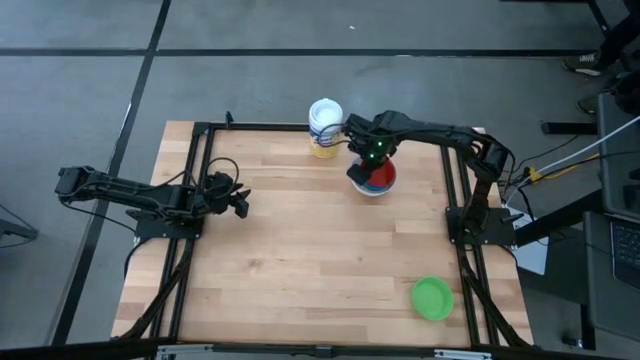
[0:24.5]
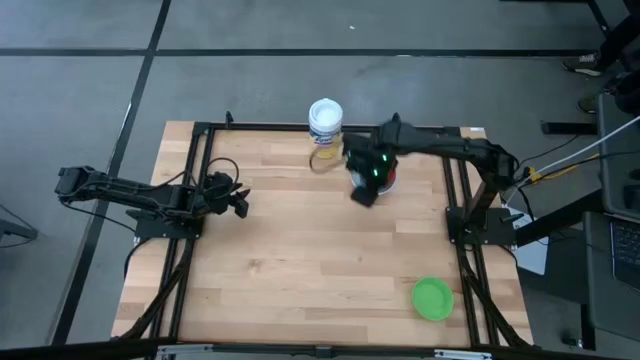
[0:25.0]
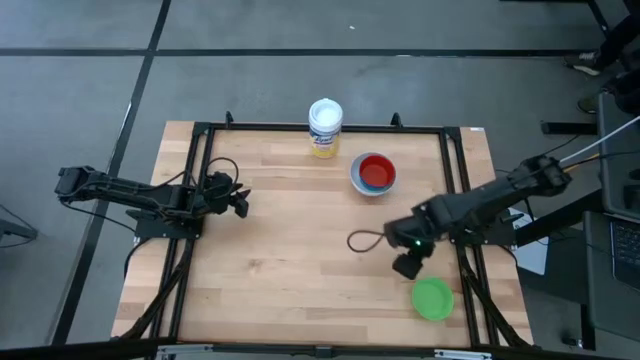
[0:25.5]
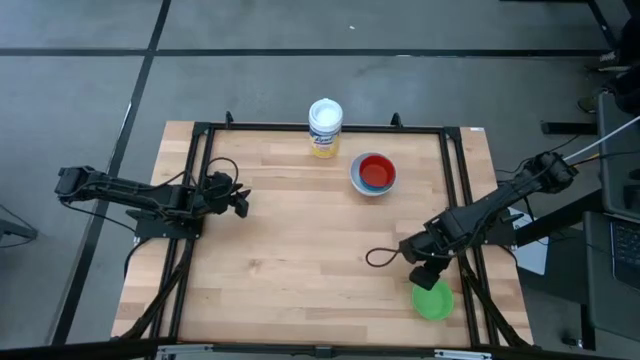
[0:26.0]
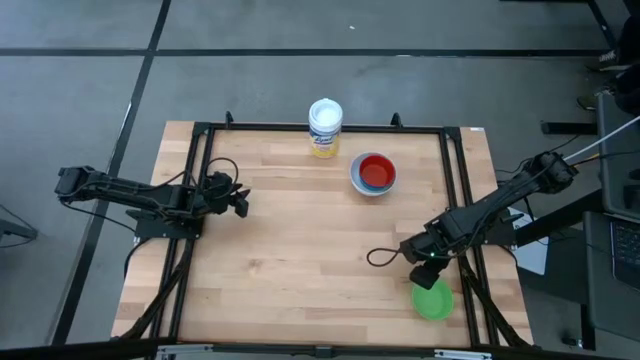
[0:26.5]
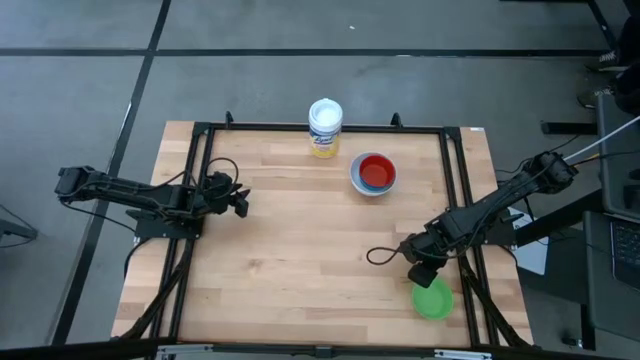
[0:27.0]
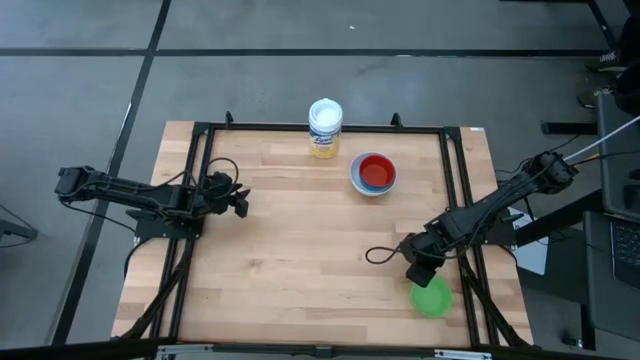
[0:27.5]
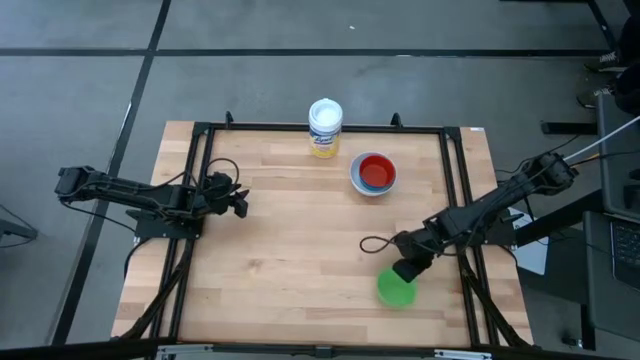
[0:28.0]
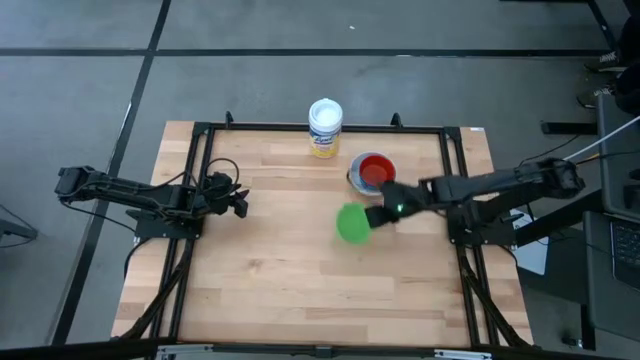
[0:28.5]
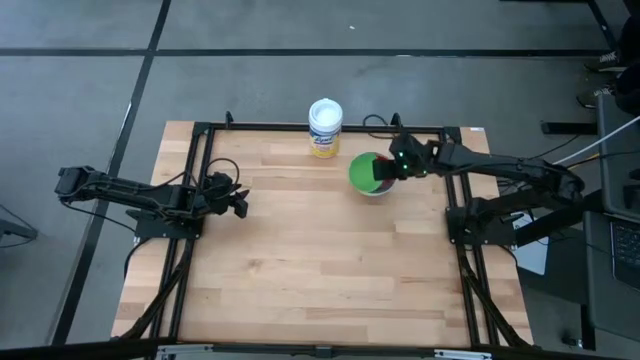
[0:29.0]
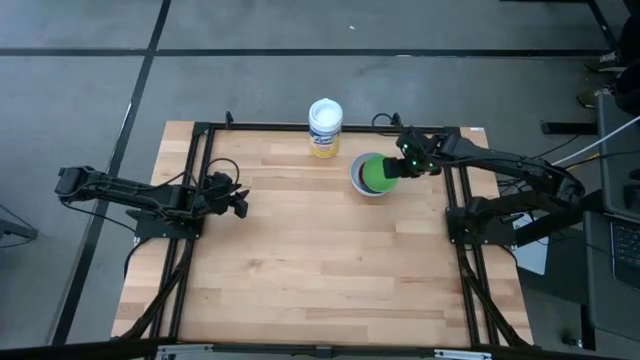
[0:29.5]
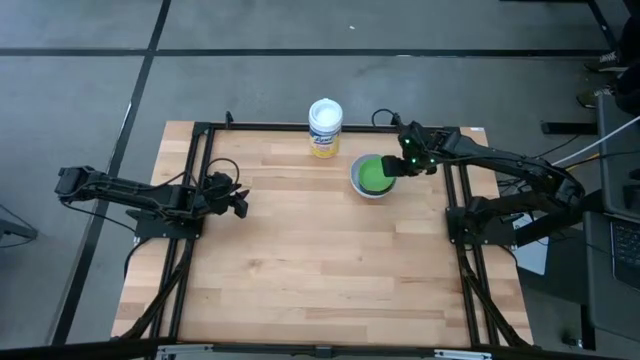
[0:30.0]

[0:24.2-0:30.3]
Stack the green bowl on the red bowl

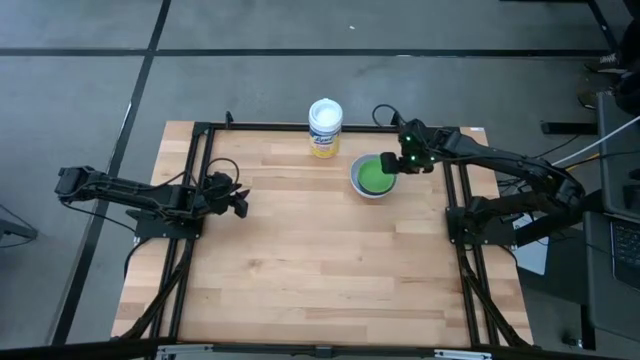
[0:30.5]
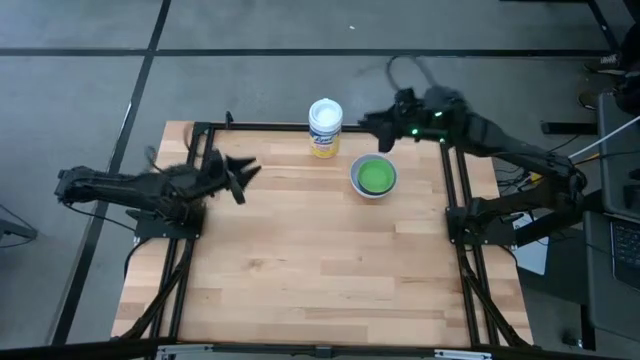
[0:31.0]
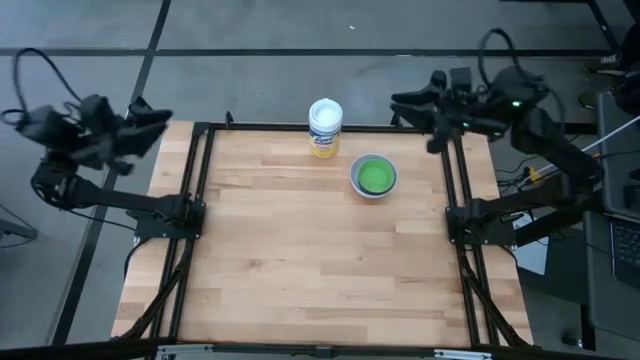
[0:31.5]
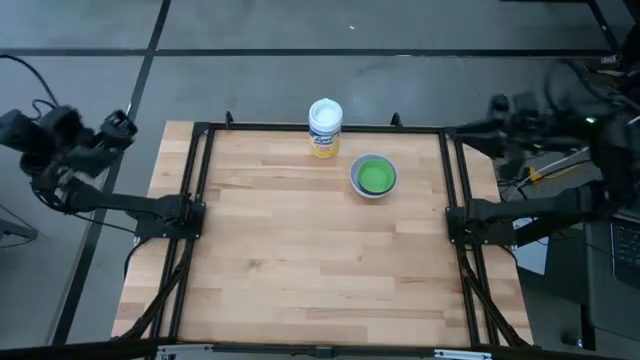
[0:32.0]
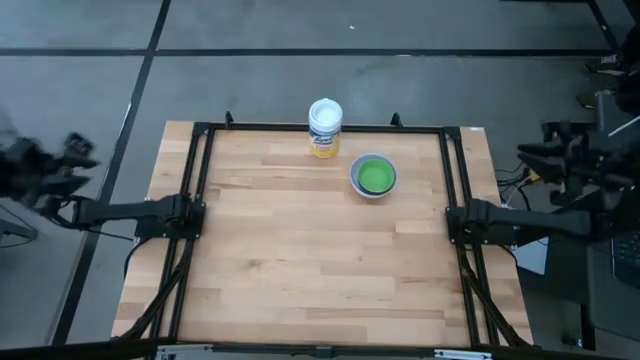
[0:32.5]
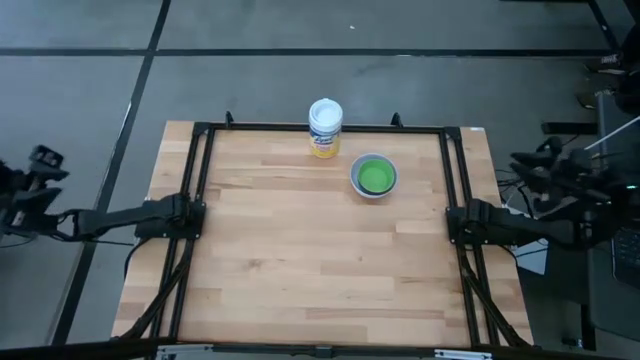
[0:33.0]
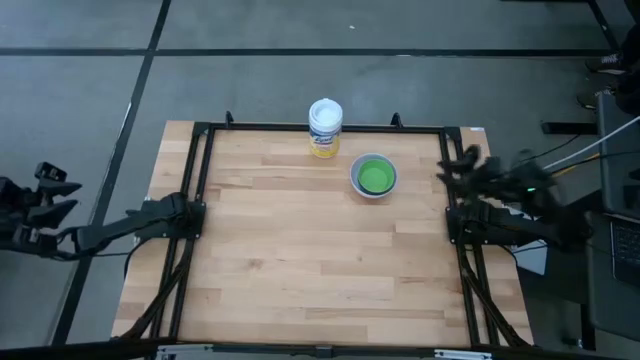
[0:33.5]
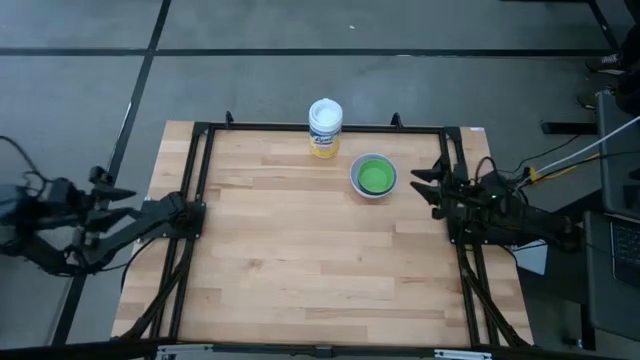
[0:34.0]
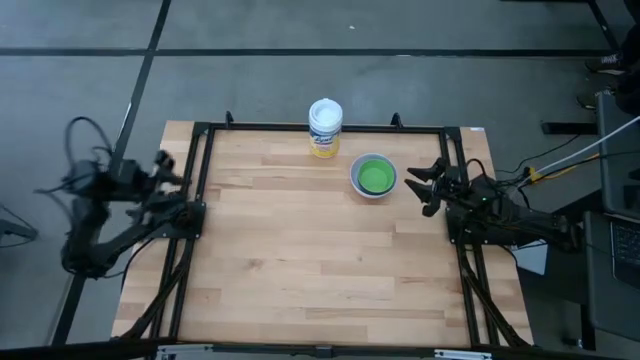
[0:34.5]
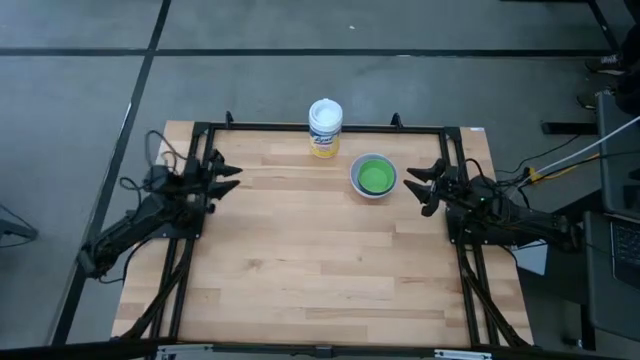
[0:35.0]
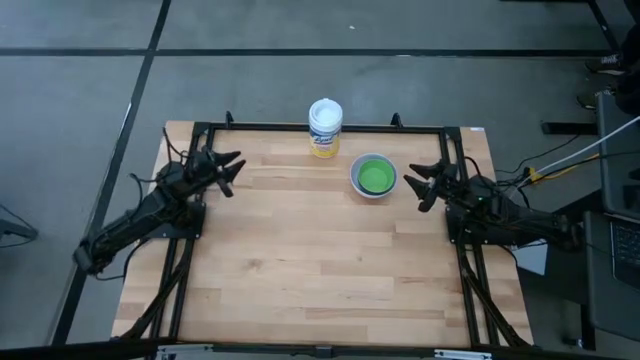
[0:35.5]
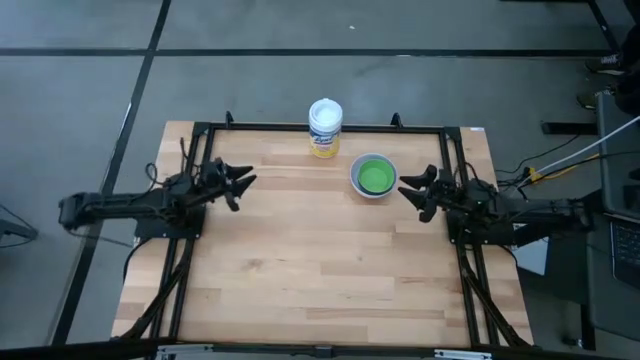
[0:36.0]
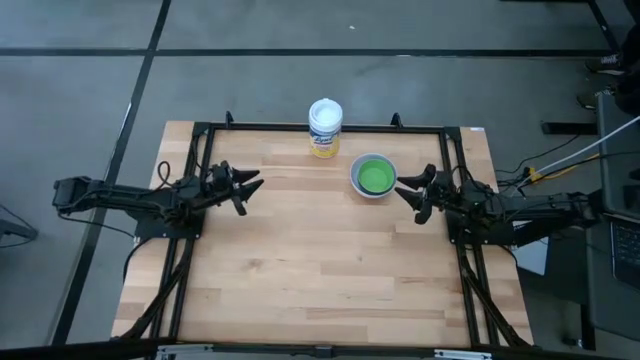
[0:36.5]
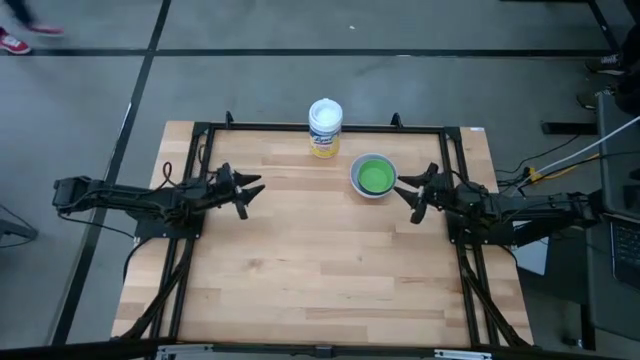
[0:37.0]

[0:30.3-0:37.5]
Return to Home Position
